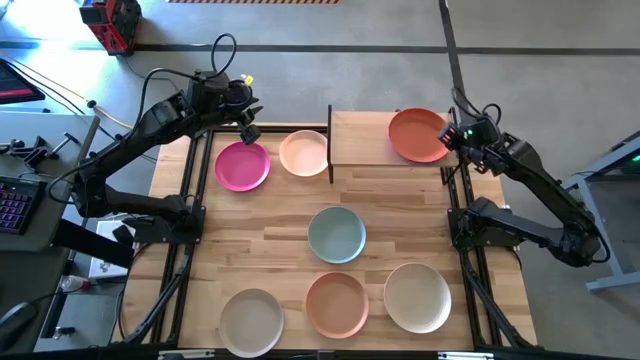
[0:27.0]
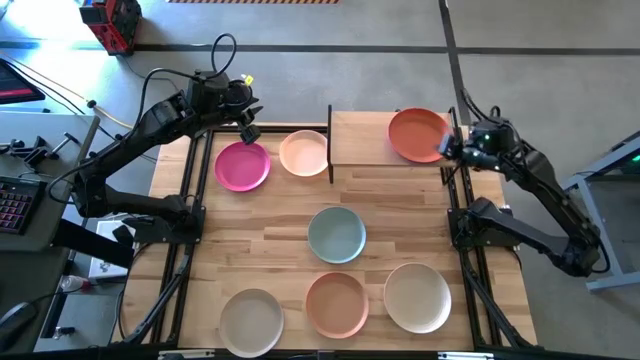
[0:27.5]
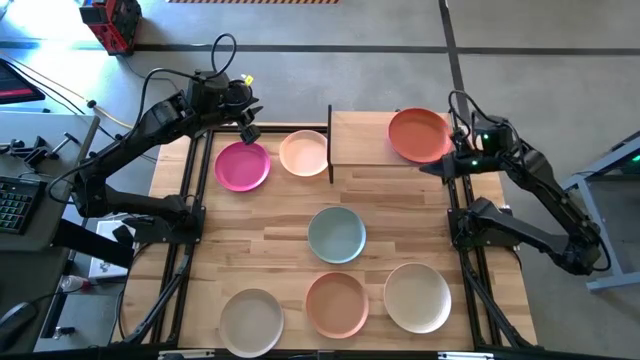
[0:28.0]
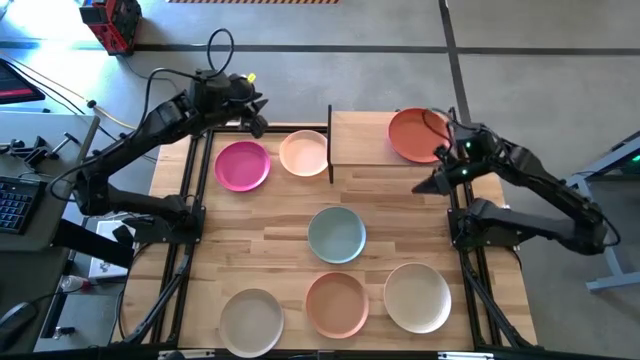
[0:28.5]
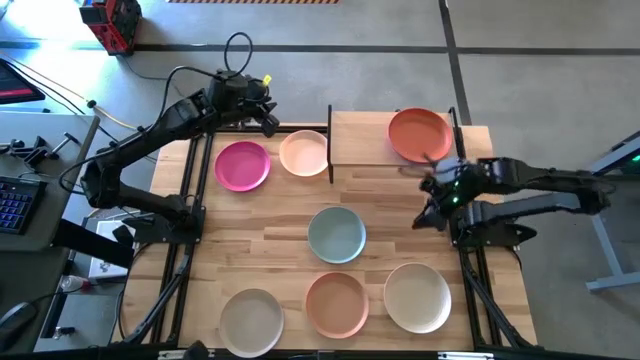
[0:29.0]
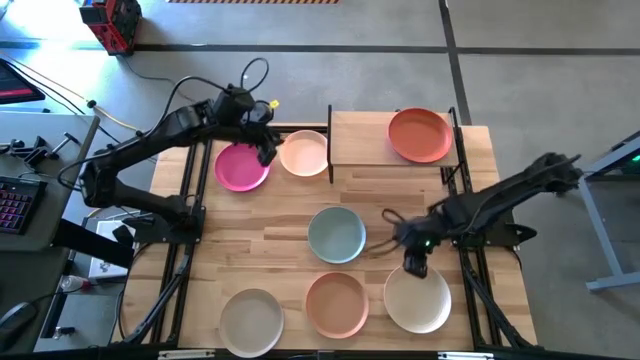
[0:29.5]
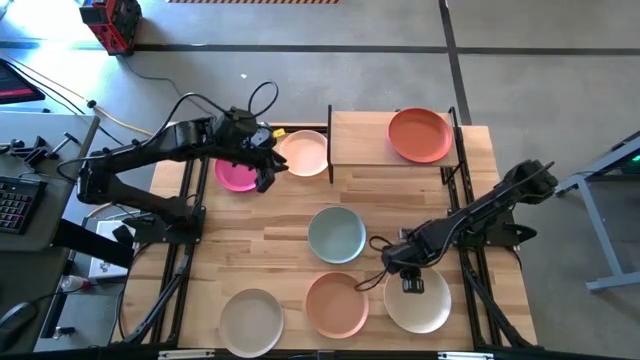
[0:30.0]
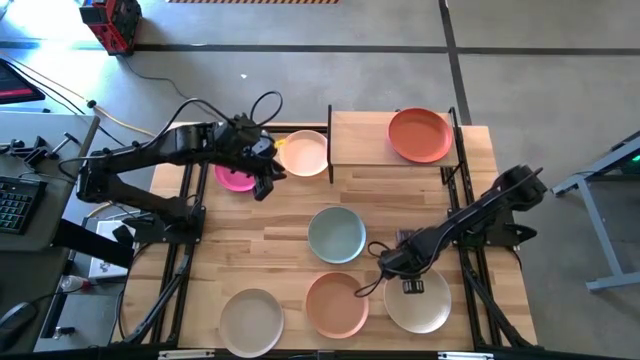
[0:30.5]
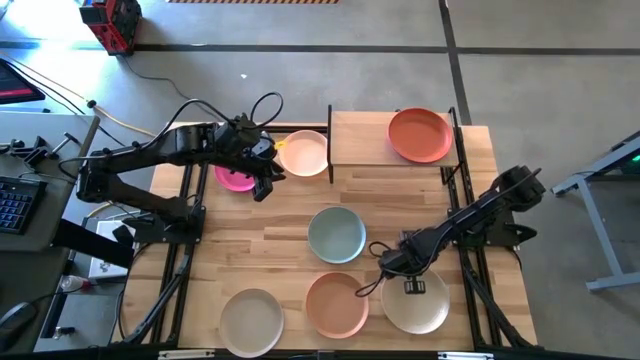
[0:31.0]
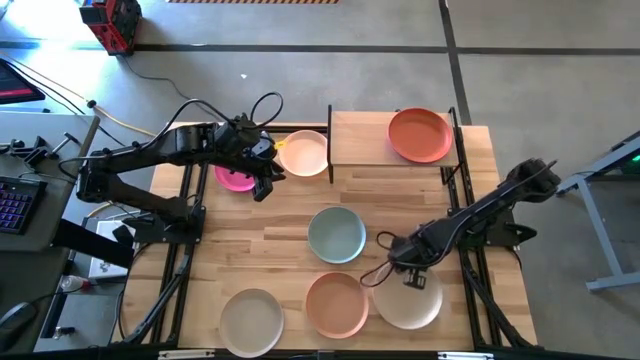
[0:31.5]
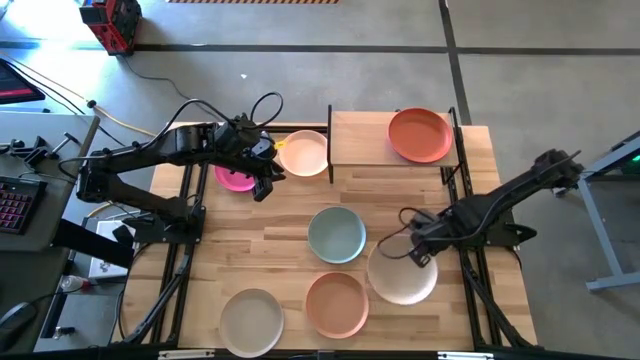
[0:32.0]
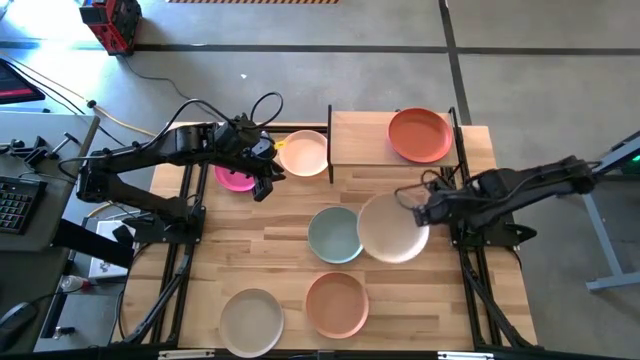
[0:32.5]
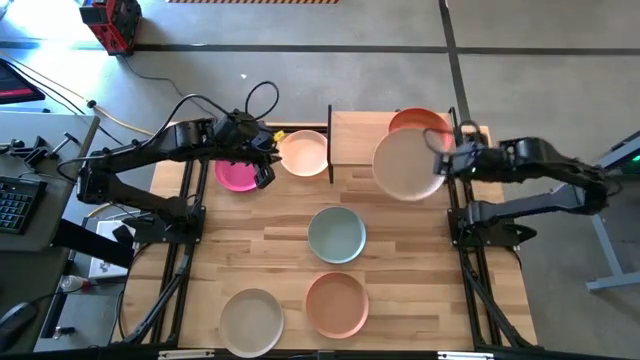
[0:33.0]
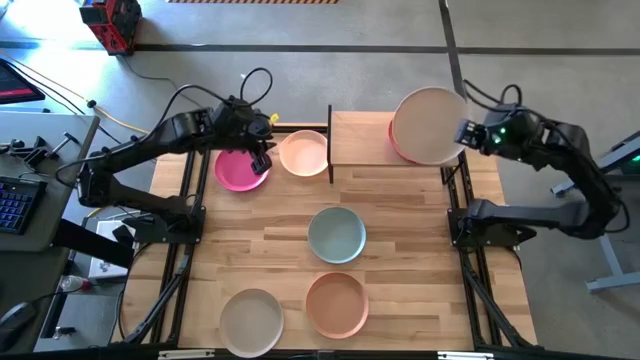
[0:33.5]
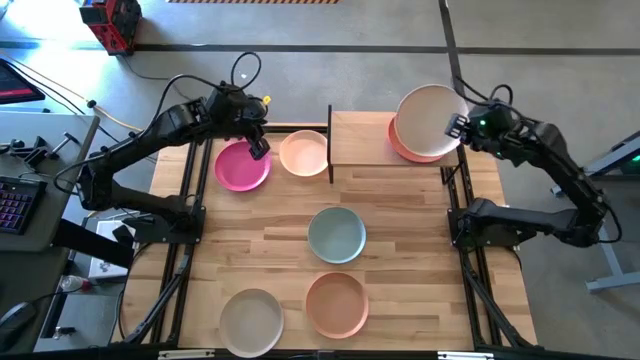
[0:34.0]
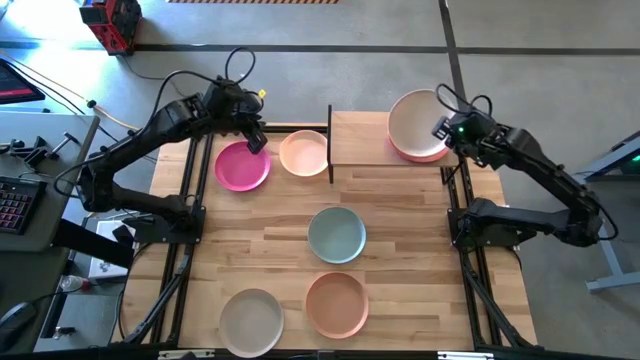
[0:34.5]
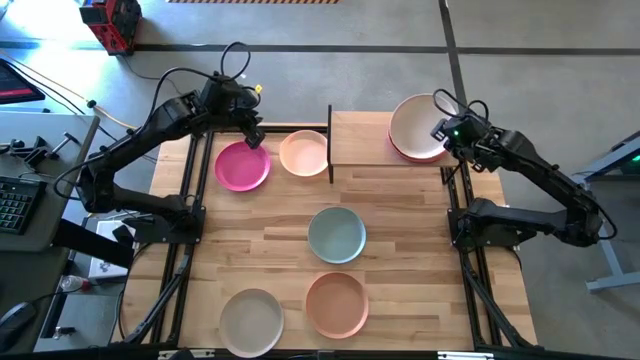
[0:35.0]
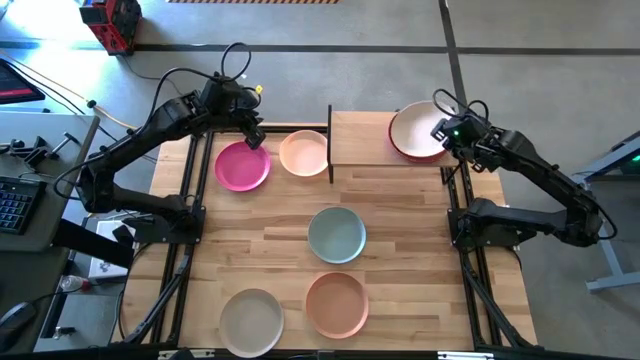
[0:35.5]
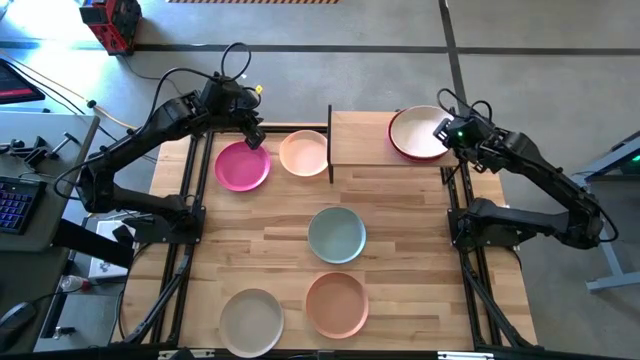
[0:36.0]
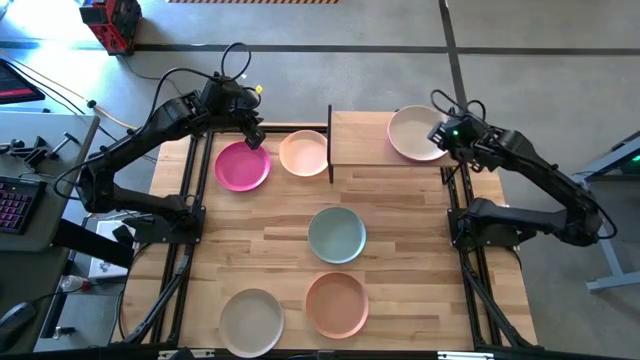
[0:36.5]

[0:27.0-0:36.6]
Task: Place and stack plates onto a shelf
Stack the white plate on top of the orange plate on the shelf

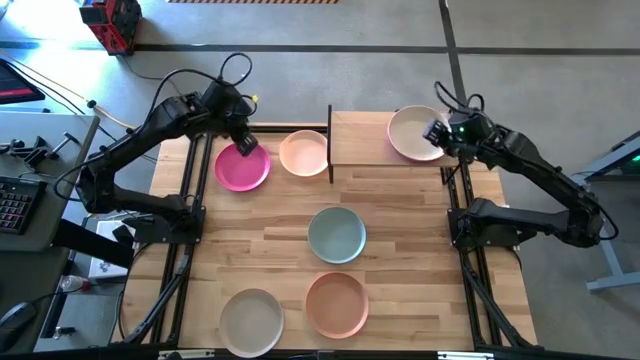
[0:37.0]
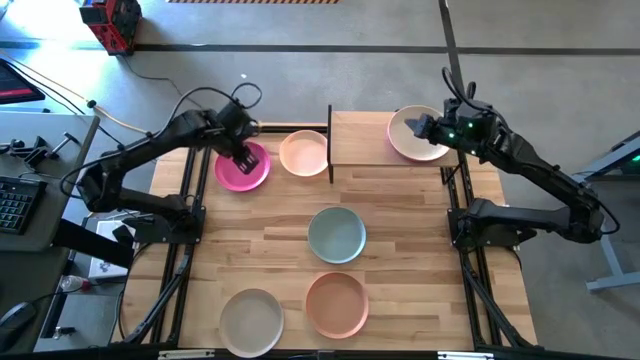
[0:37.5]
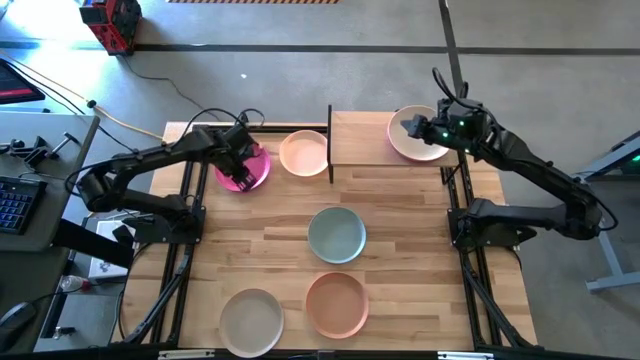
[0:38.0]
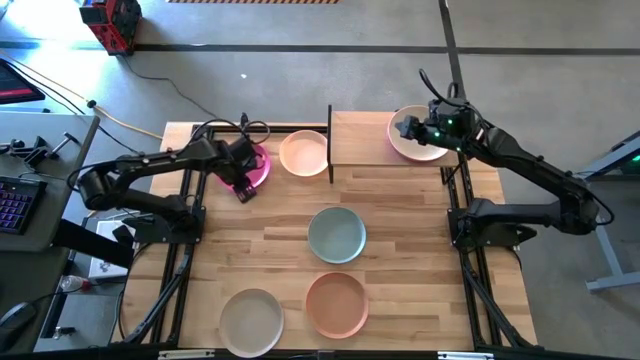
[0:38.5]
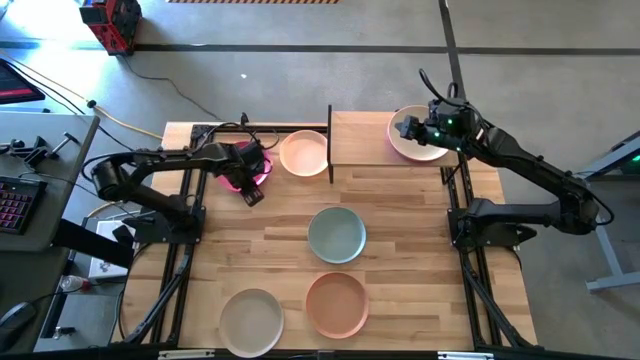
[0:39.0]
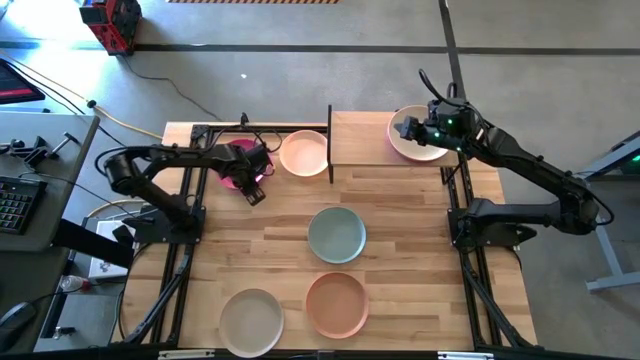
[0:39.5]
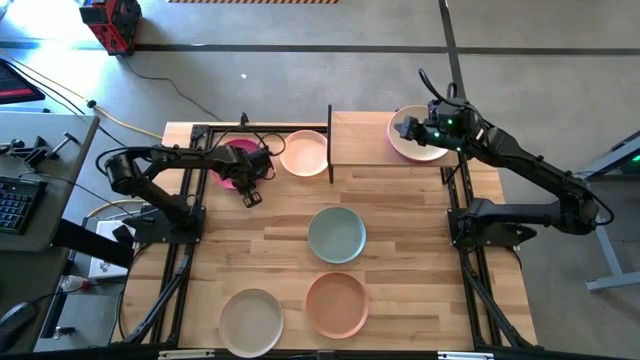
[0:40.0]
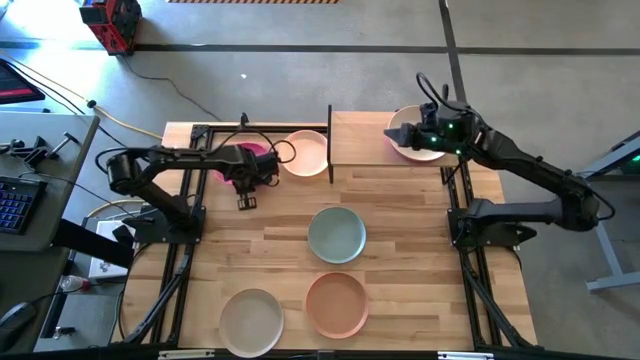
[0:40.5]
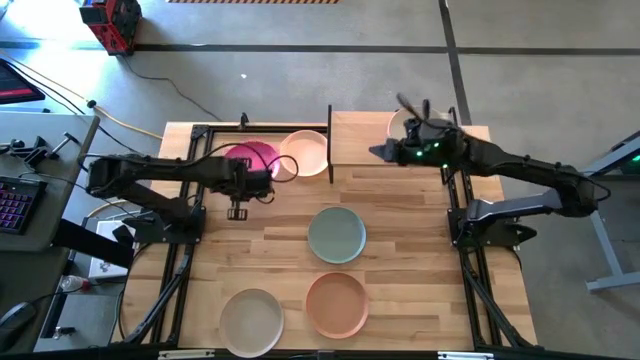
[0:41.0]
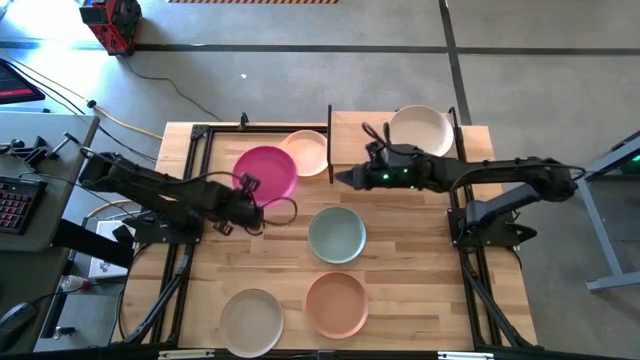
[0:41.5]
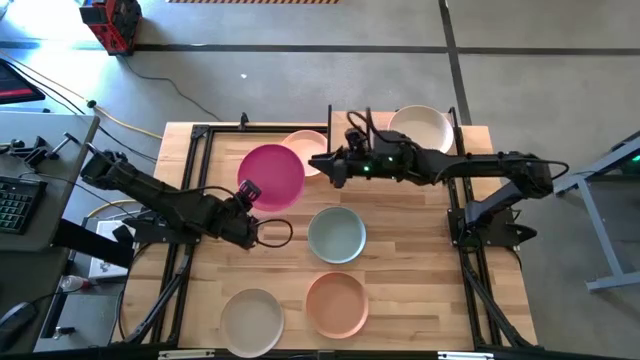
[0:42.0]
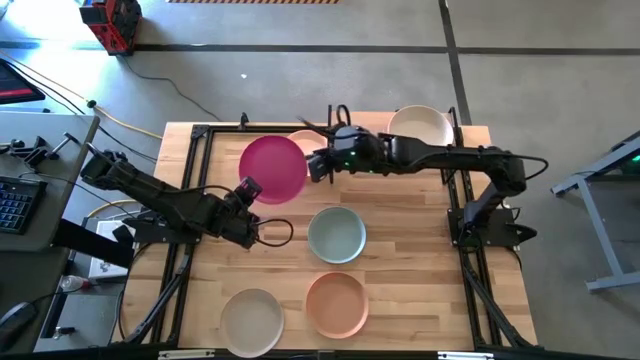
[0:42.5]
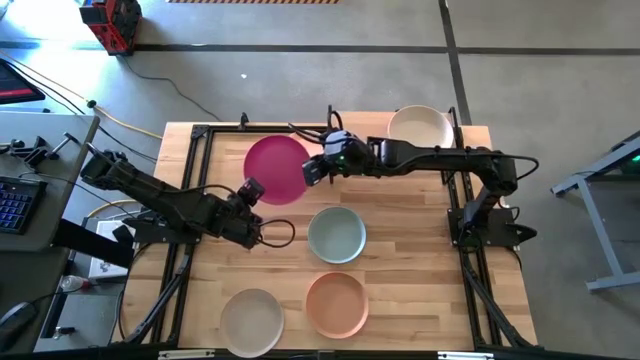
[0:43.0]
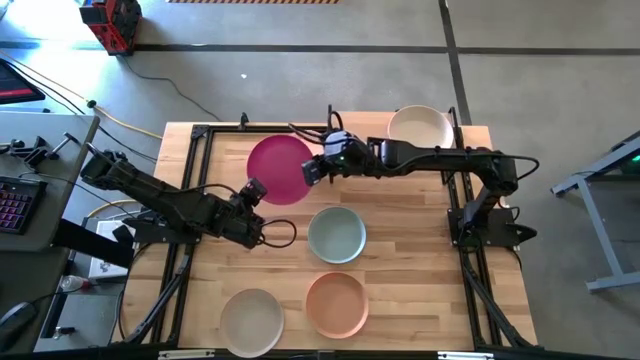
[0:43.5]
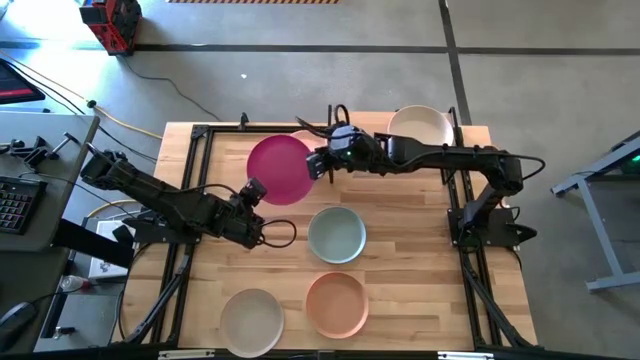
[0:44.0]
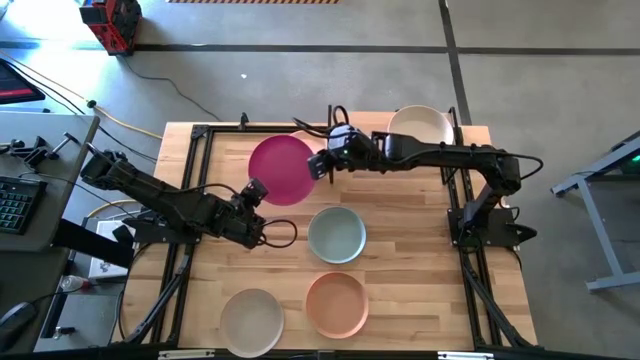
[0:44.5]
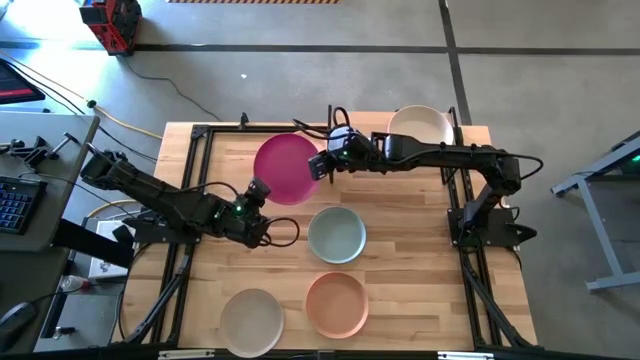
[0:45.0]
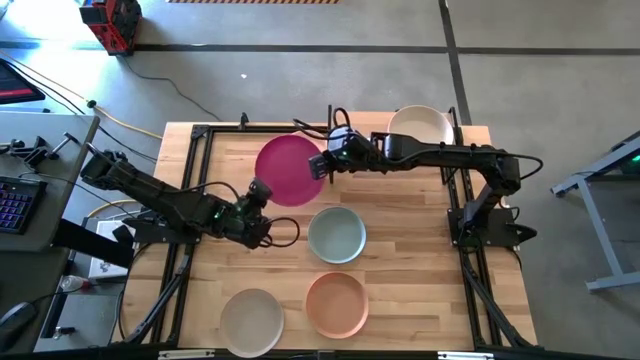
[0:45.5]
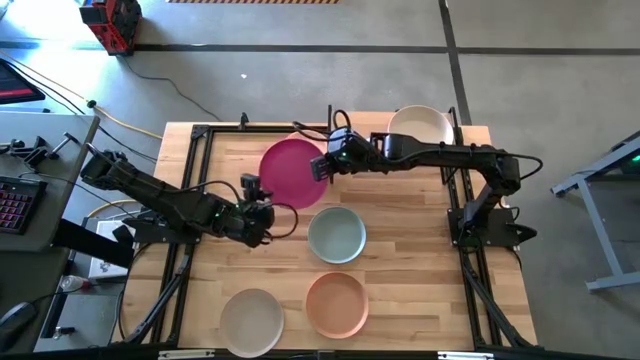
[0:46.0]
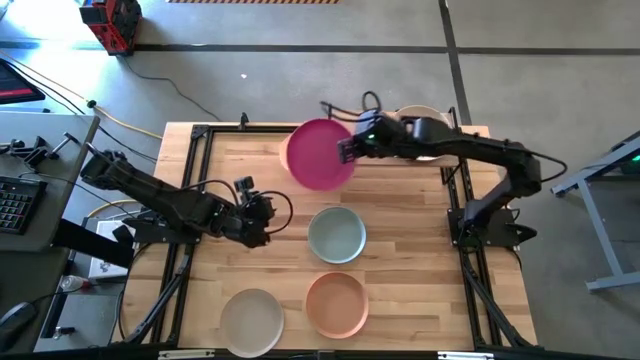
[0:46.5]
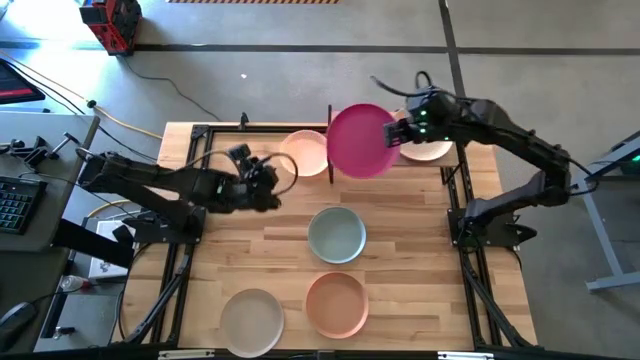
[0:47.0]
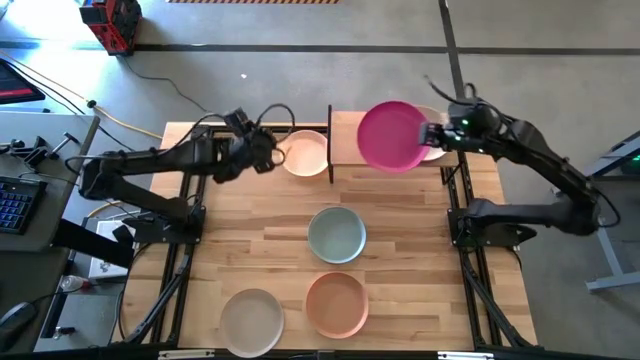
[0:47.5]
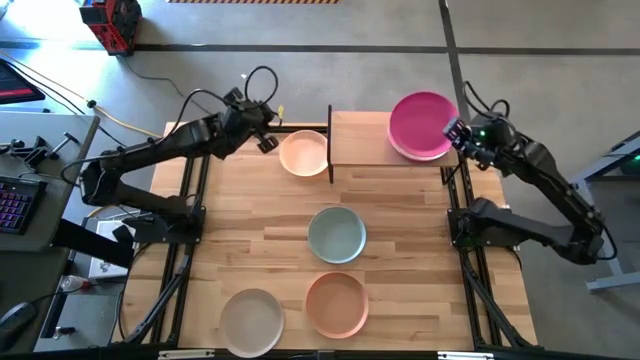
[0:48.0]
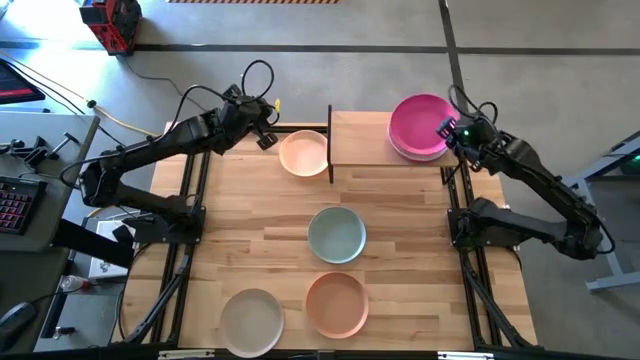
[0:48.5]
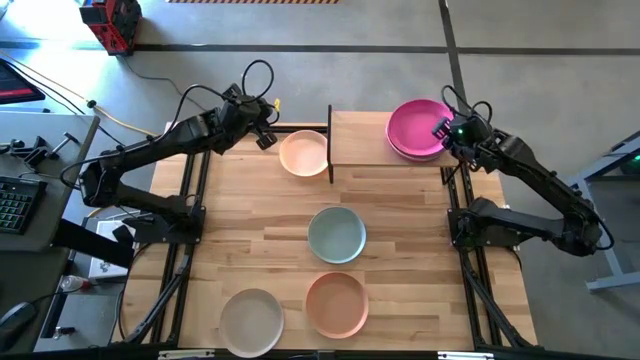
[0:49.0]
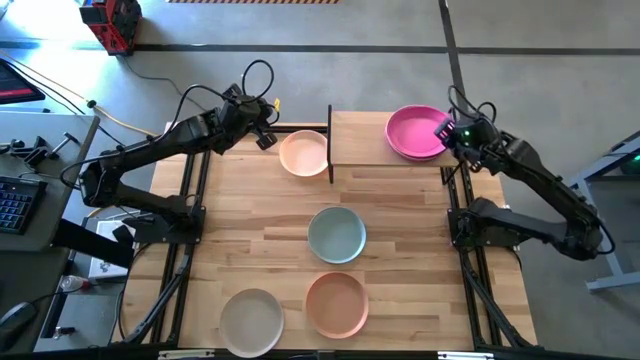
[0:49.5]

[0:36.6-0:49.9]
Stack the pink plate on top of the white plate on the shelf
